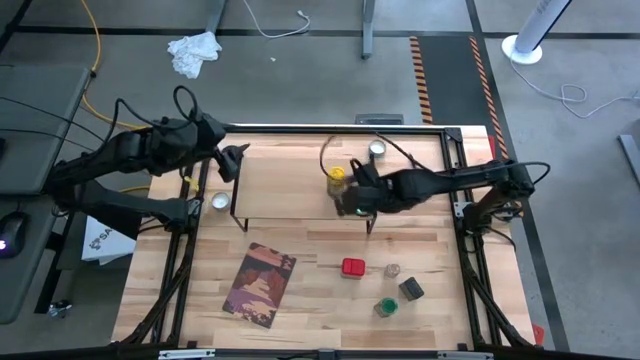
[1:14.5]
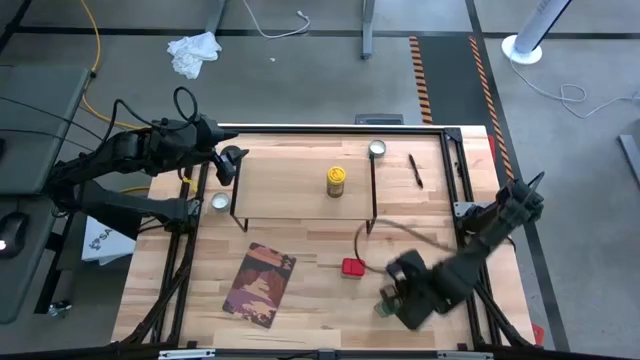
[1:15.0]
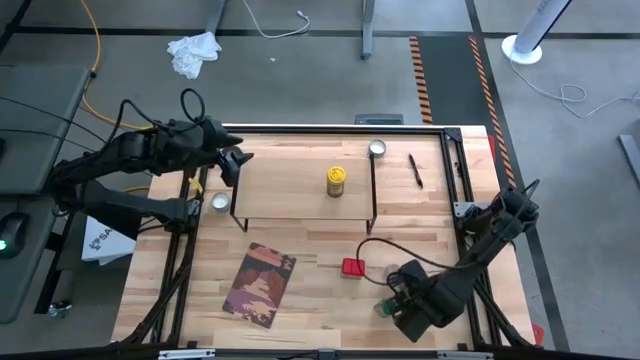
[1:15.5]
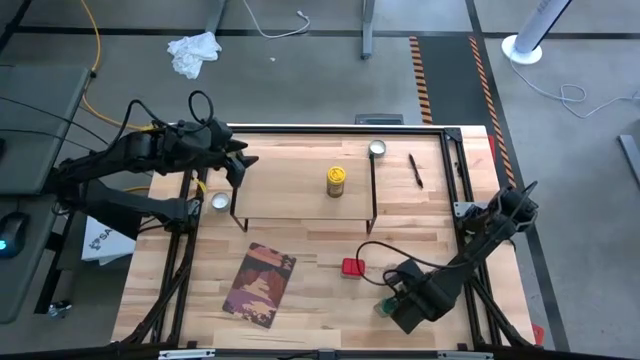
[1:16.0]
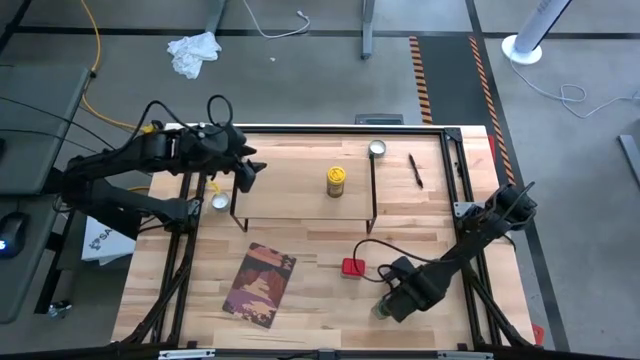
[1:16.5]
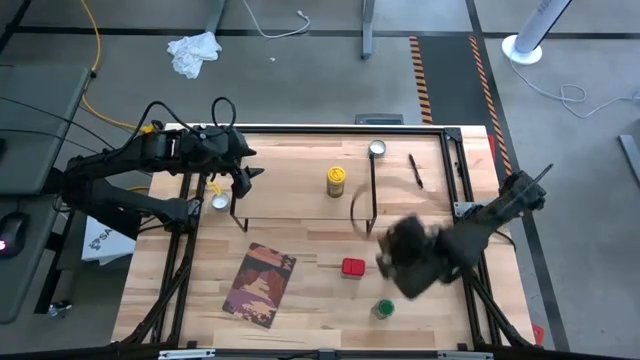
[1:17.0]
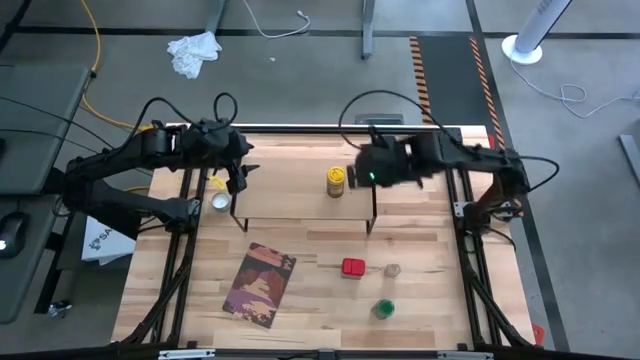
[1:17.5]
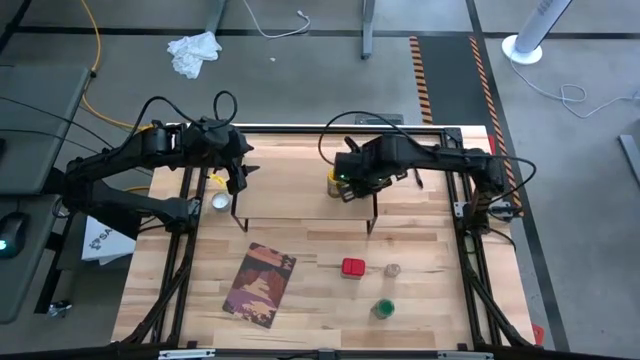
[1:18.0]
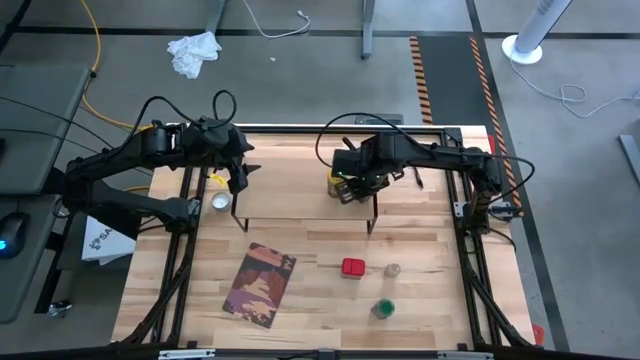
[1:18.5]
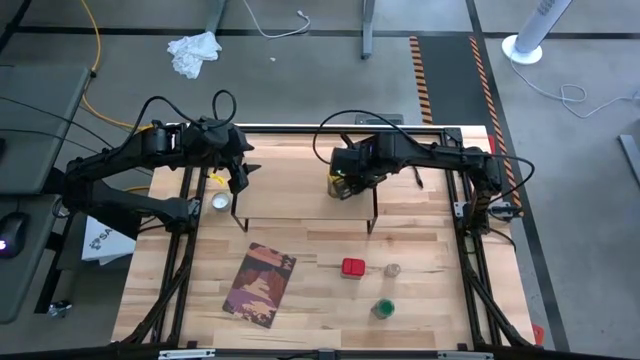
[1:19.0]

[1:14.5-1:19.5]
Task: Shelf spices
Put the black seasoning can on the shelf

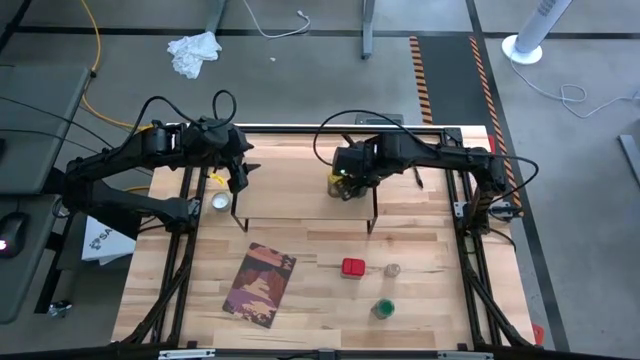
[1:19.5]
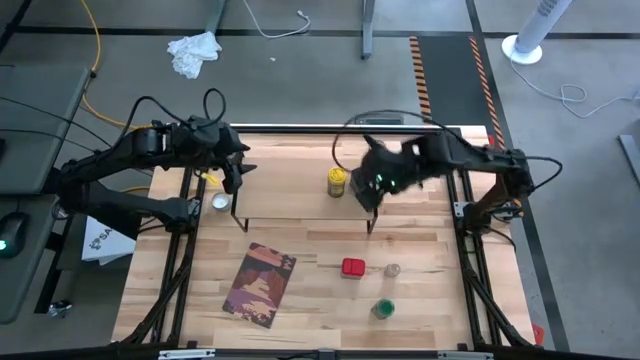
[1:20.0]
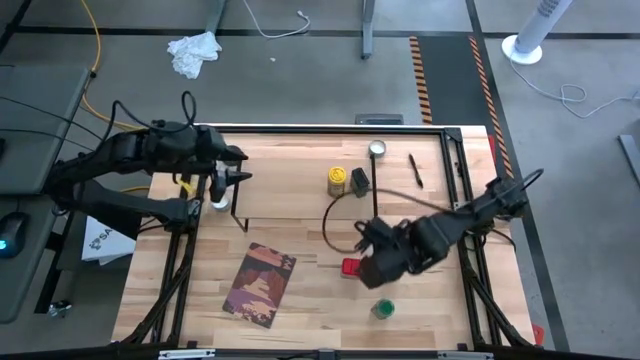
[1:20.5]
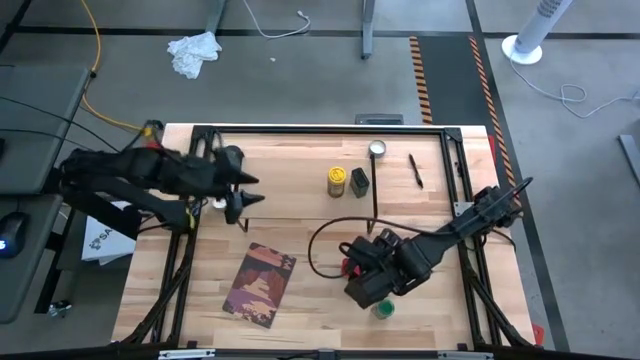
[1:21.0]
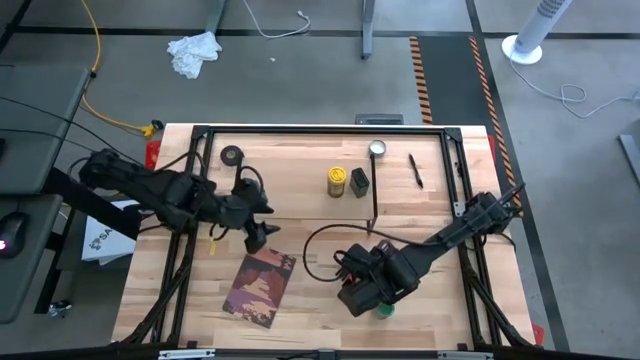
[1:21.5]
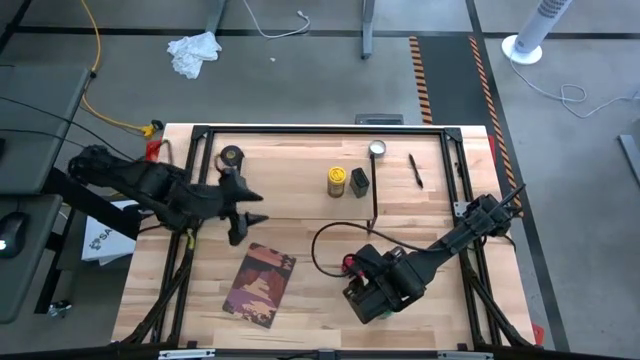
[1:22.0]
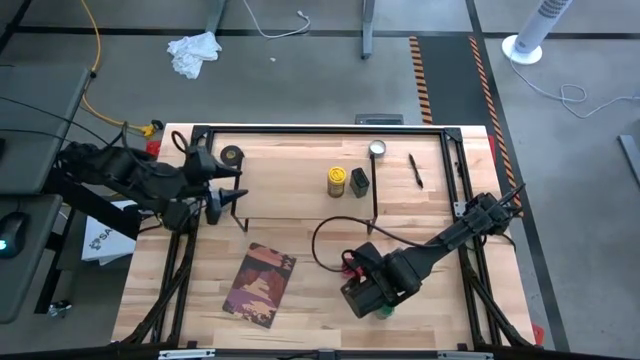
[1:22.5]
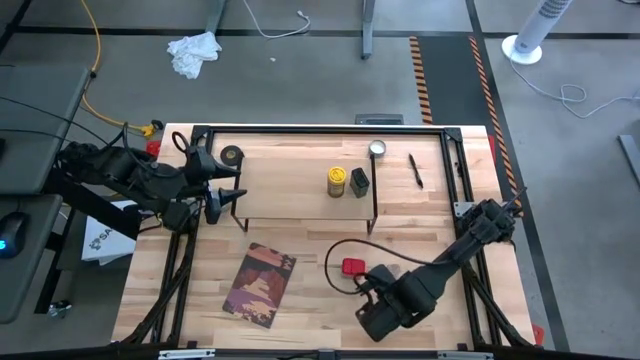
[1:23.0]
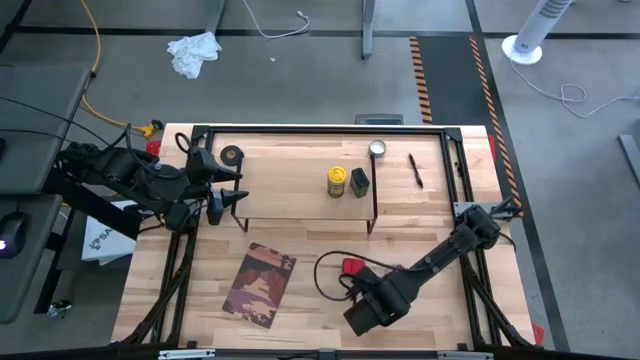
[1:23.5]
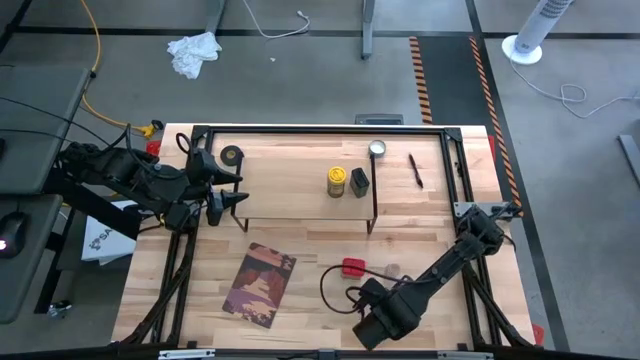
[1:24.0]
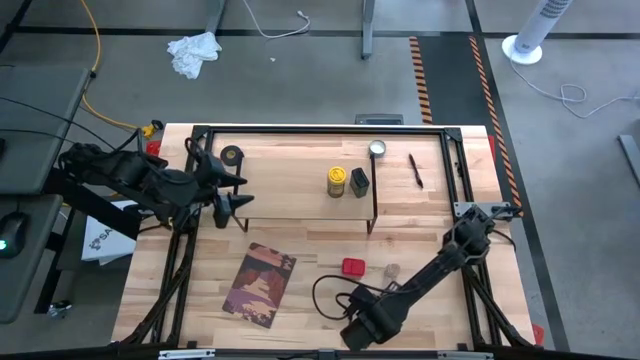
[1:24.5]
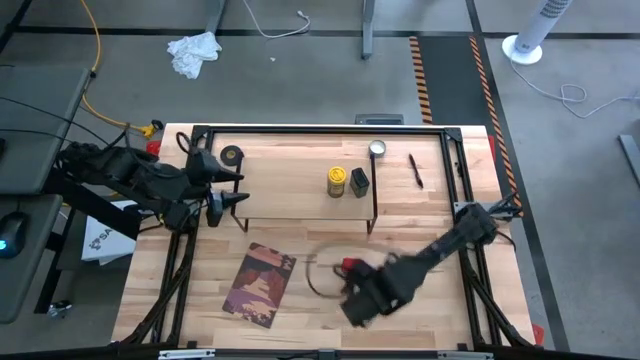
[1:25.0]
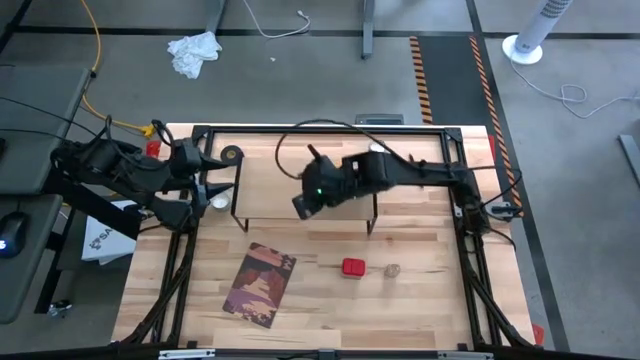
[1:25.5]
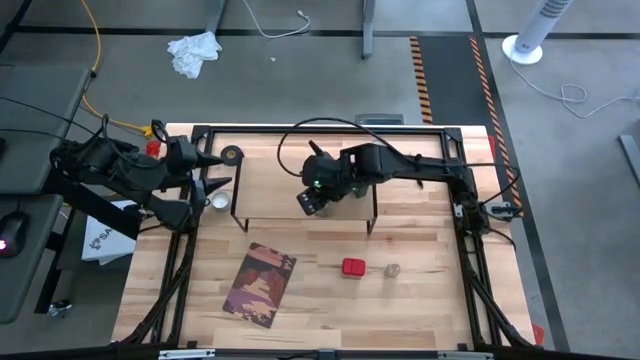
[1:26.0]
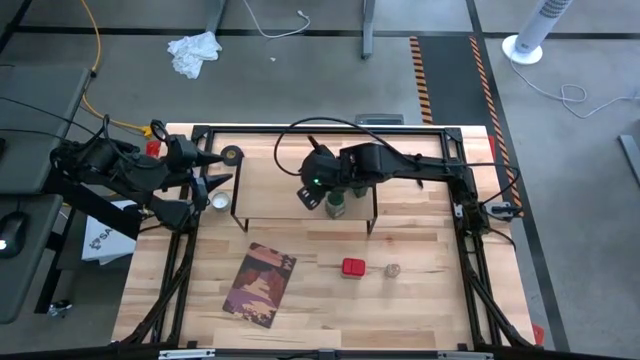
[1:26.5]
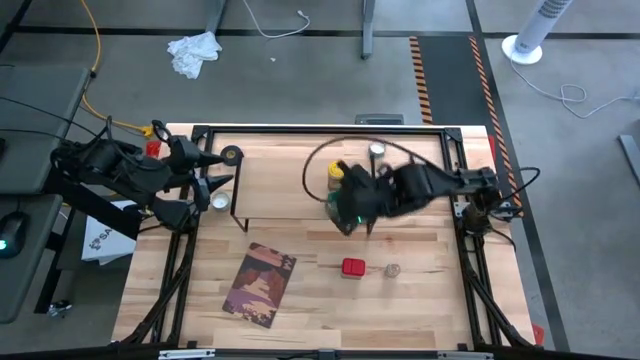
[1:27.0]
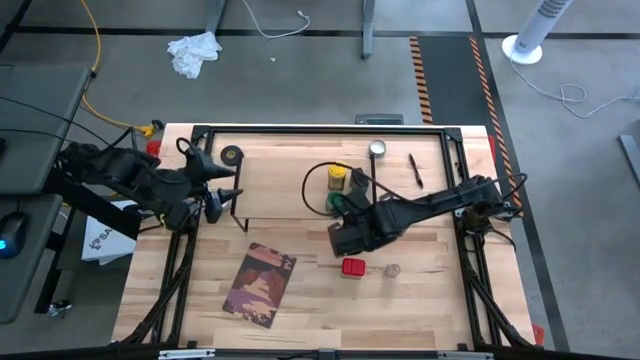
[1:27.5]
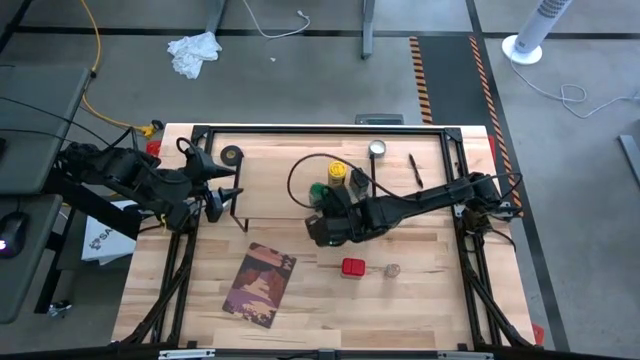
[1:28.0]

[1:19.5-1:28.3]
Put the green seasoning bottle on the shelf

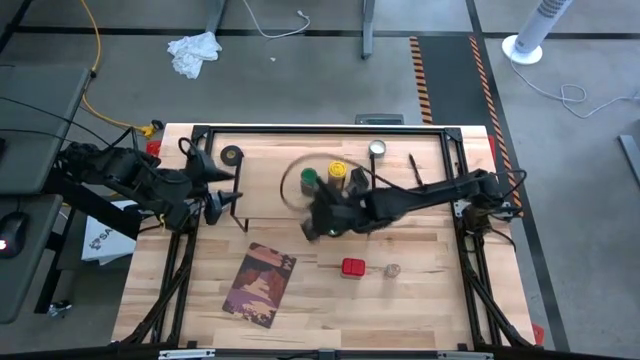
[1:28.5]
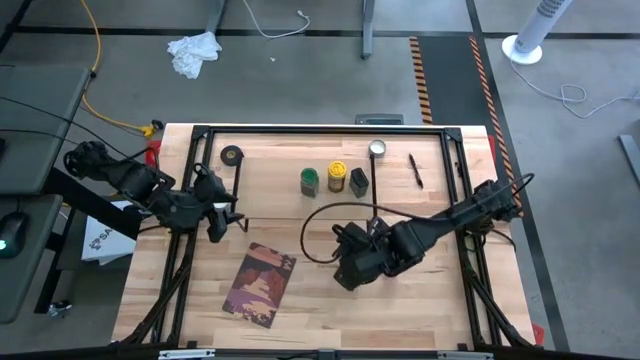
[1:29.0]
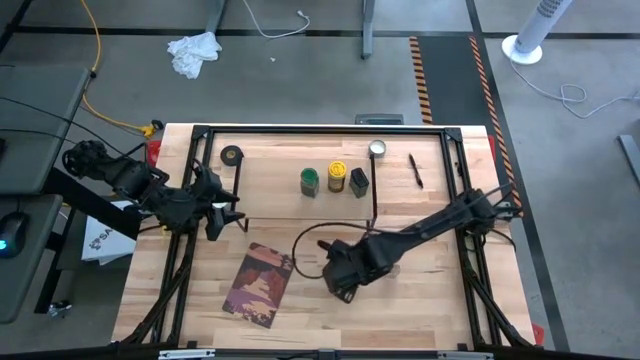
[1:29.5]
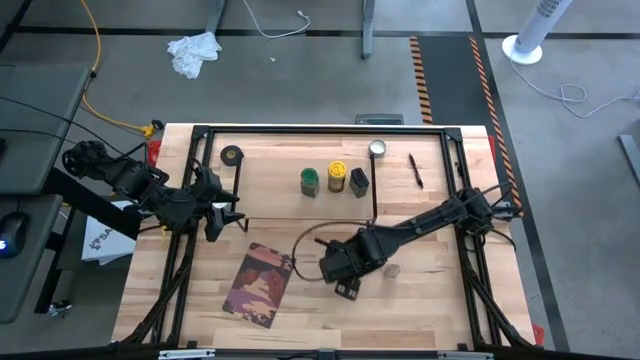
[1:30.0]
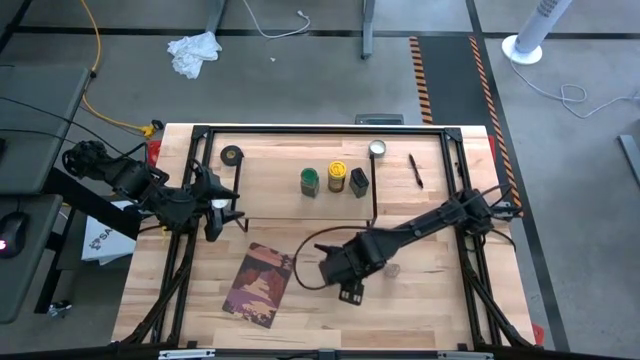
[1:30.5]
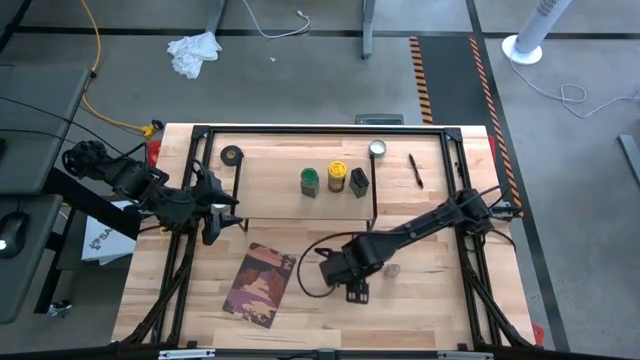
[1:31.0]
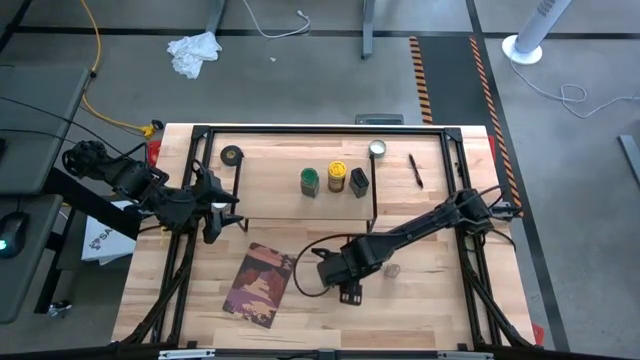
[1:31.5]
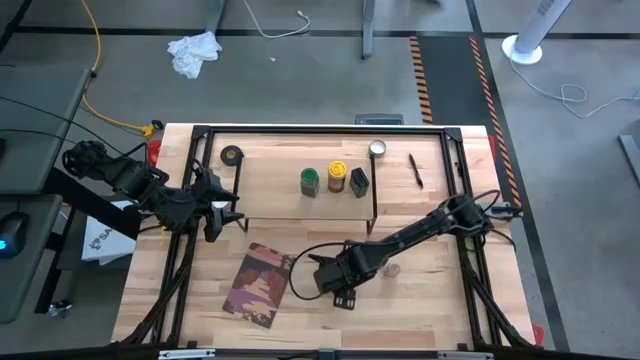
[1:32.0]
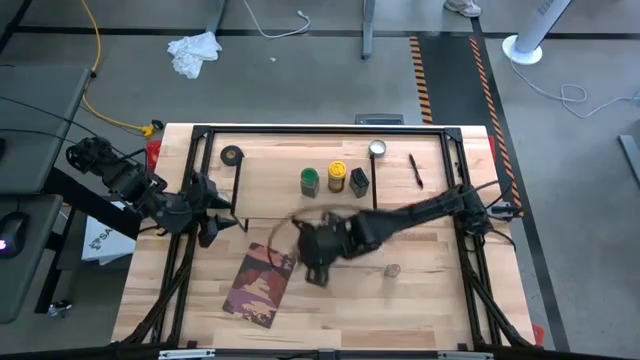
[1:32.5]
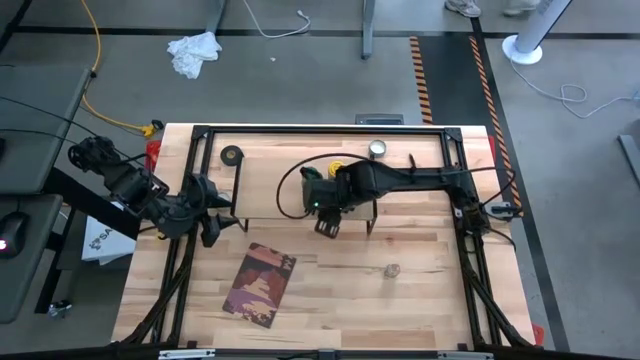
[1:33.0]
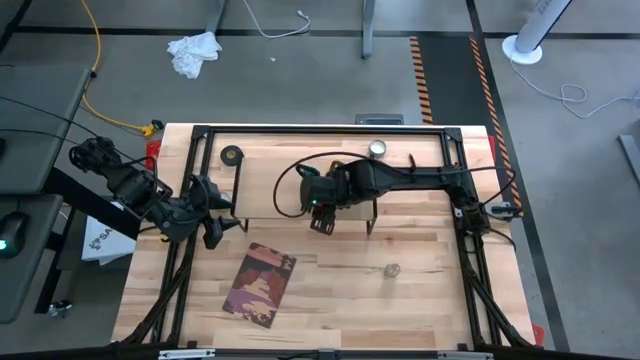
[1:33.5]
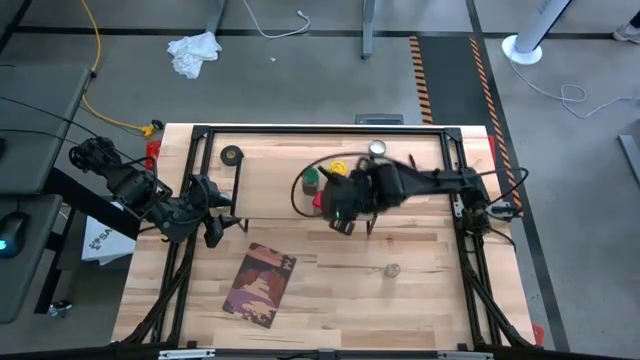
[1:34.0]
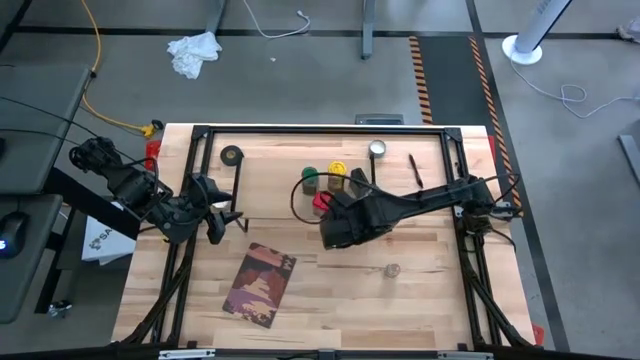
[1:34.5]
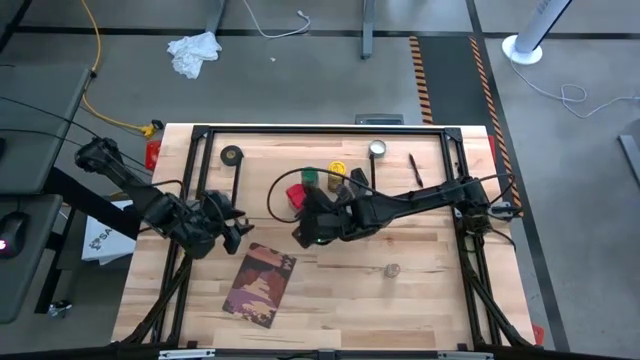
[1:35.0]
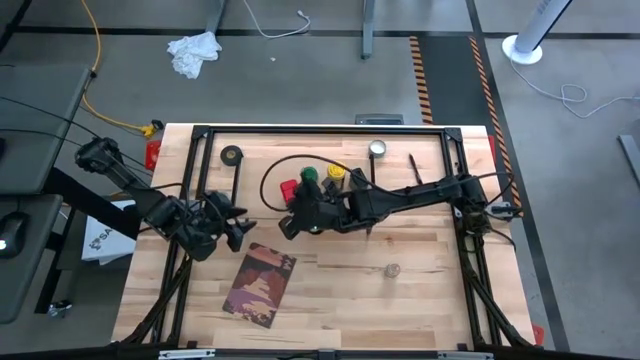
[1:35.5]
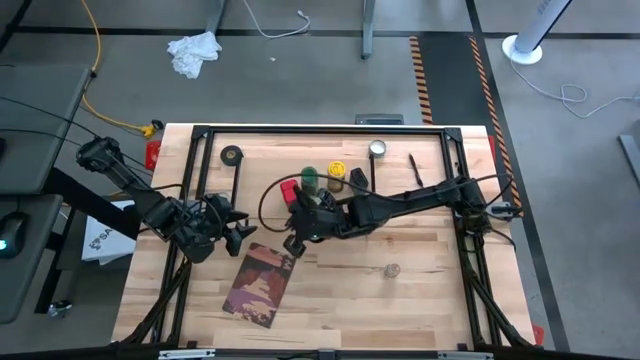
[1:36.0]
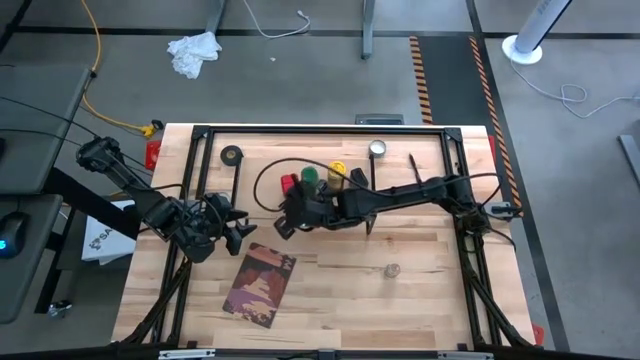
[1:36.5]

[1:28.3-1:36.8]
Put the red seasoning can on the shelf
